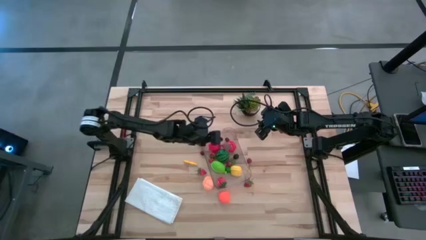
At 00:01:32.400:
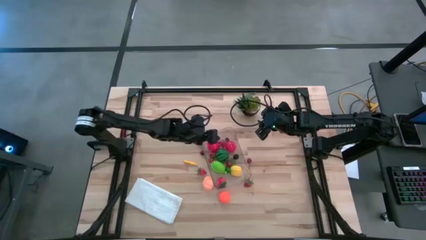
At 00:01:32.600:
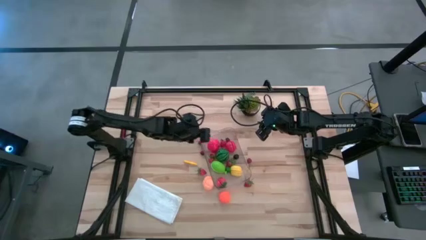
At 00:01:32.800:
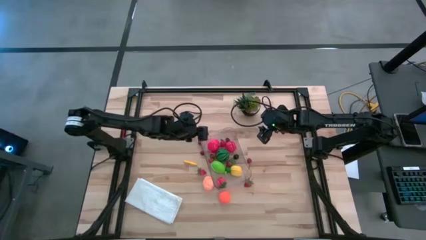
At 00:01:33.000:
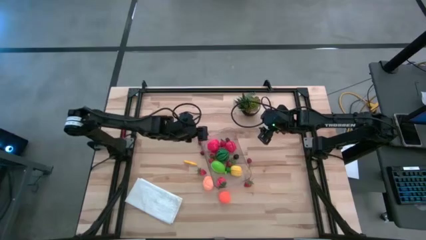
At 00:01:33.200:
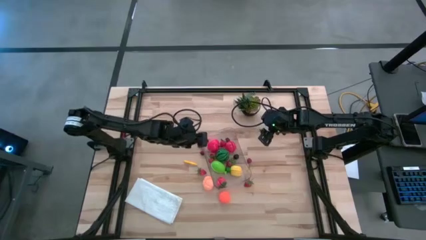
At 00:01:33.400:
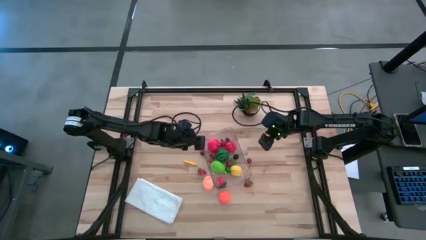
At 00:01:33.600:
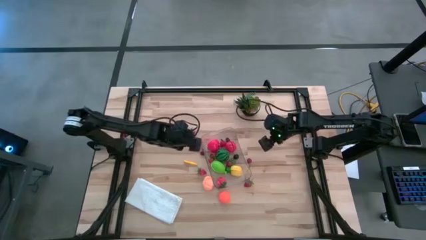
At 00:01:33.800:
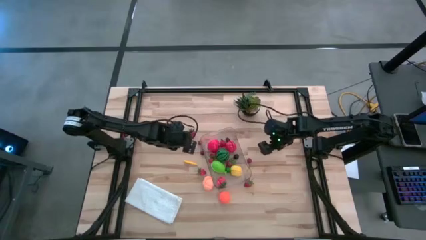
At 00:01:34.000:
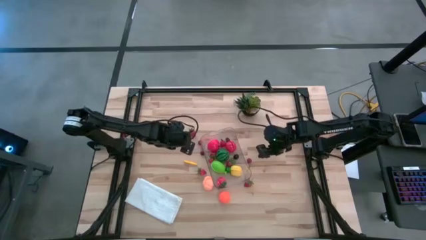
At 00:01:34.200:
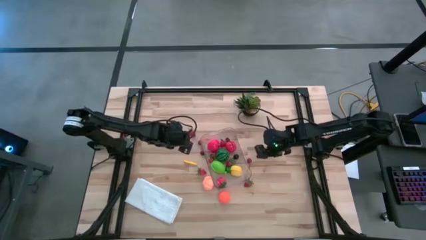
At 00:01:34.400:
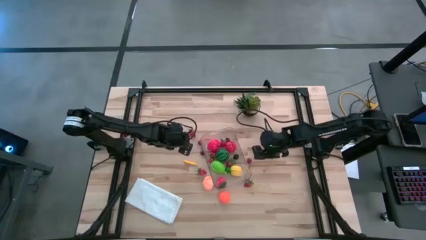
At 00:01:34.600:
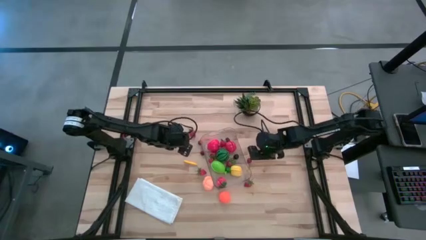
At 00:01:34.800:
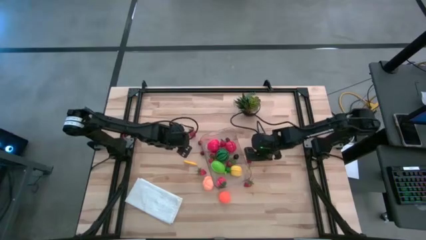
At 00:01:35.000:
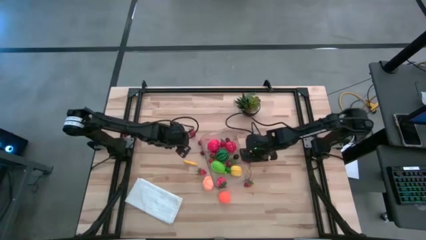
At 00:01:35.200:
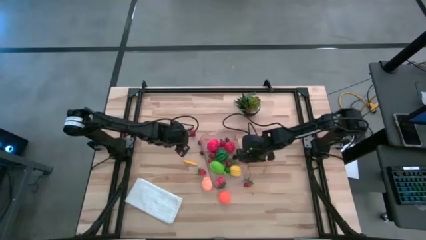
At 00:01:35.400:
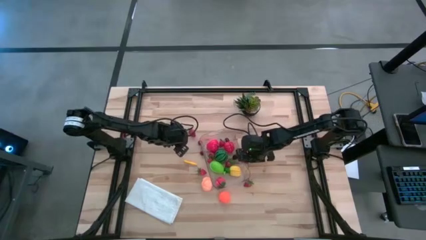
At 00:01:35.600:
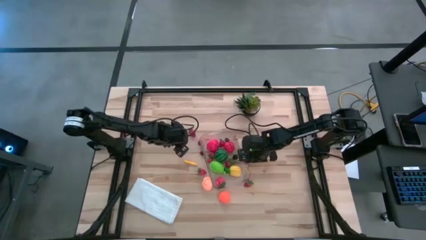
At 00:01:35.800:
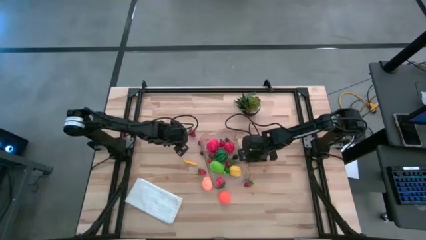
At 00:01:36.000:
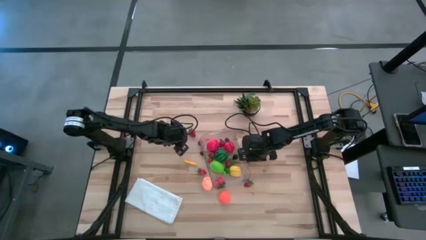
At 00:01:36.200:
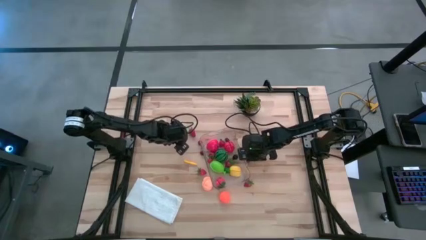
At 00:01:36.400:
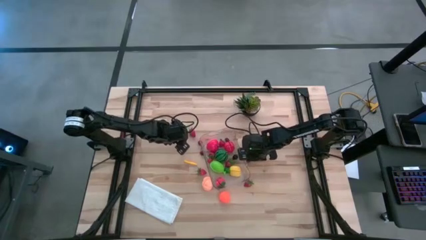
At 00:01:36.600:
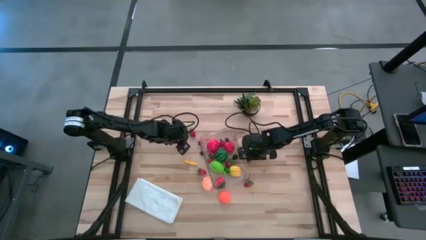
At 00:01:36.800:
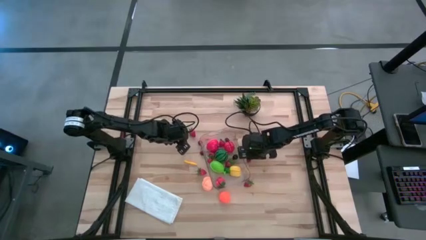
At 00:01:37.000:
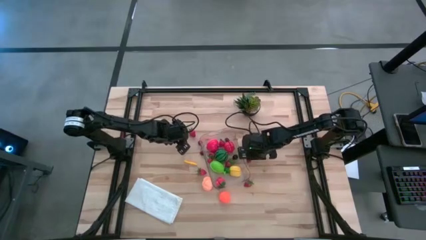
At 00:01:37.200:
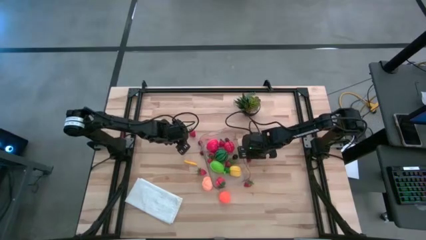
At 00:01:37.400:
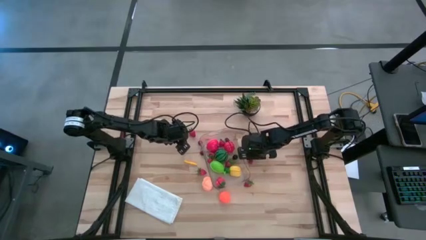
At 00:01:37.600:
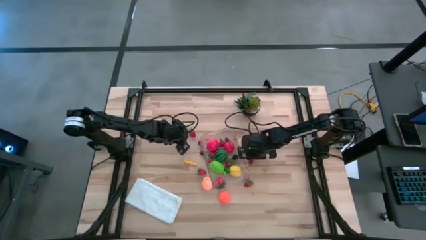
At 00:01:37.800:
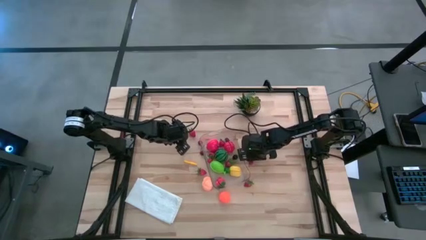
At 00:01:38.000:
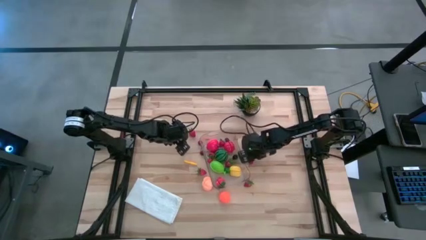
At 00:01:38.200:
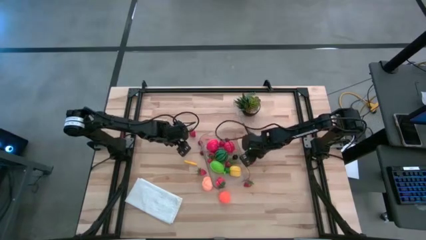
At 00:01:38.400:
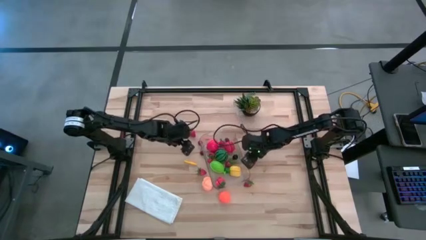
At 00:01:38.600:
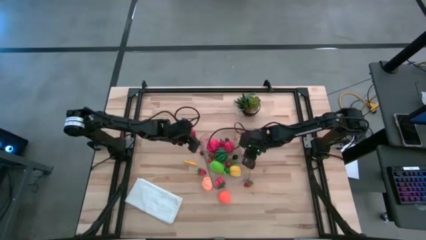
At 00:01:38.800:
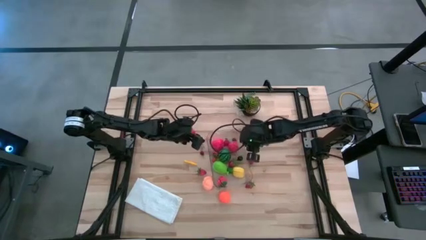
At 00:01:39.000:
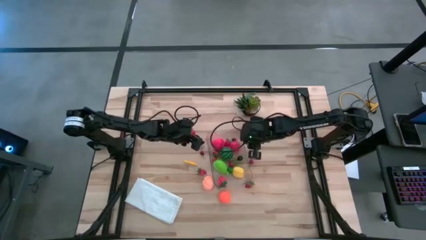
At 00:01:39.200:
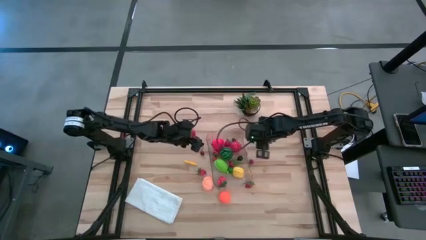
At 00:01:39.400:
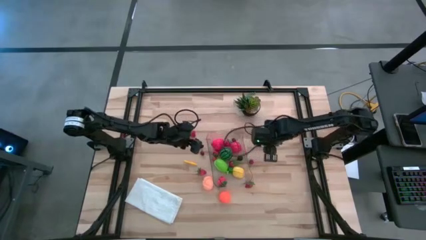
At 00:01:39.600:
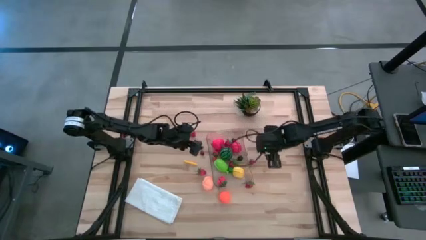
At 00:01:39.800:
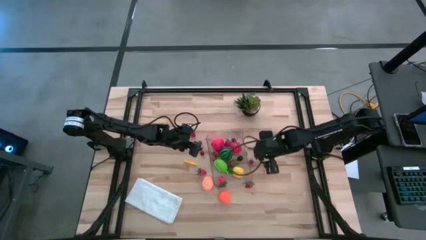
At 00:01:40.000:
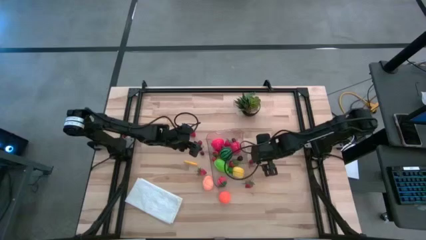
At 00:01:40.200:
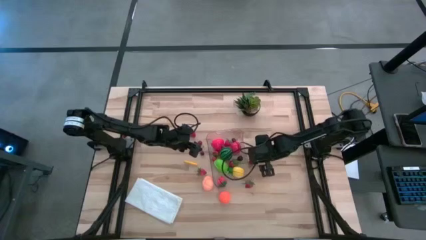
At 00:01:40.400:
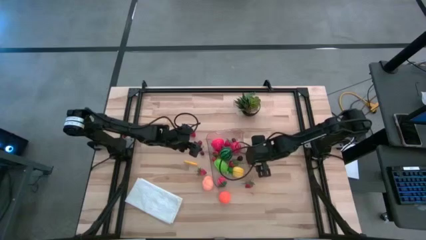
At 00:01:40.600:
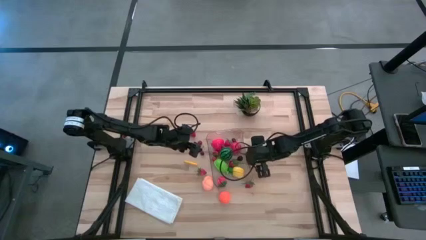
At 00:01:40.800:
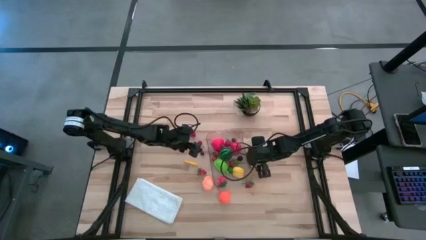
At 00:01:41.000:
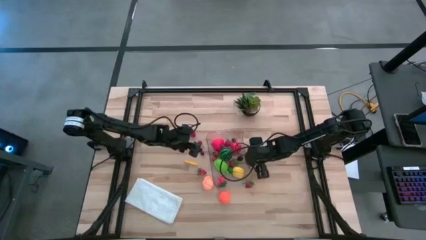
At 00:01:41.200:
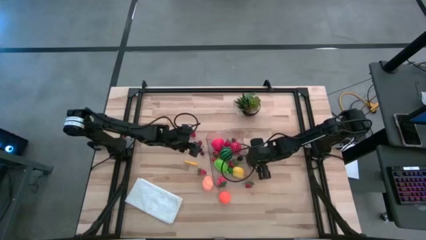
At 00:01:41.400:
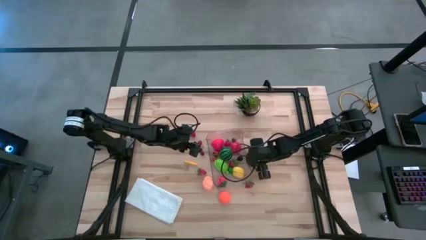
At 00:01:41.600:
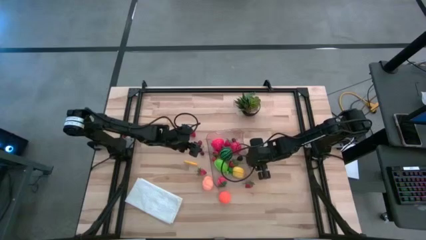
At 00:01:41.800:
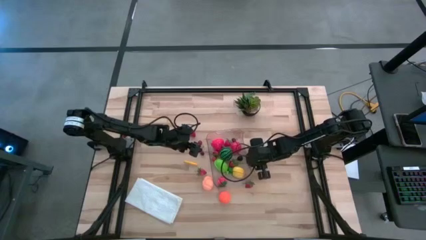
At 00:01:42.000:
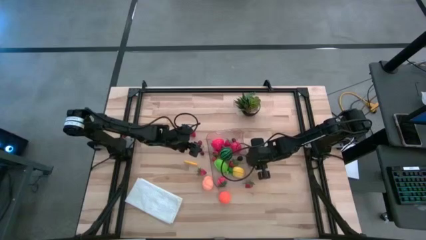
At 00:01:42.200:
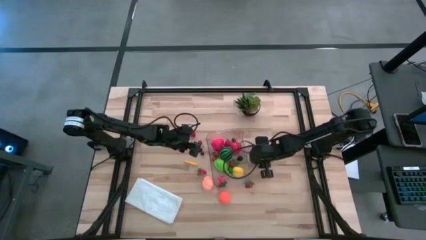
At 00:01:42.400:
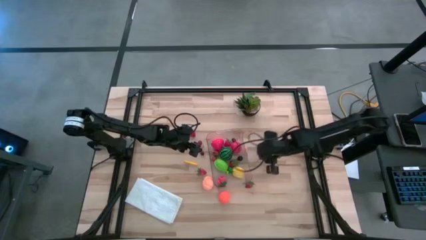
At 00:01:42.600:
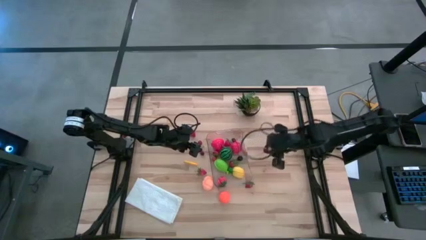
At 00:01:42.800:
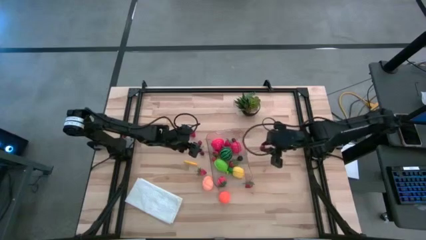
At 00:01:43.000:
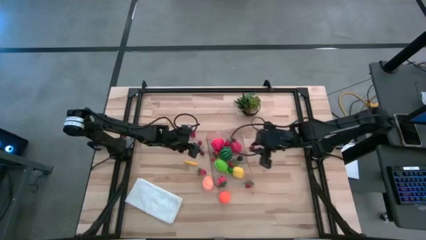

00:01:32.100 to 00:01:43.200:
Task: Pick and placing Produce into tupperware
Put the red cherry into the transparent bin

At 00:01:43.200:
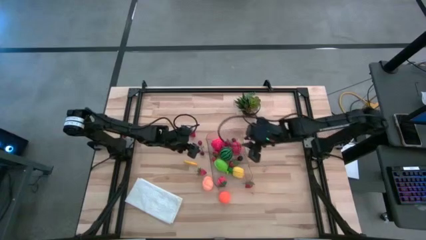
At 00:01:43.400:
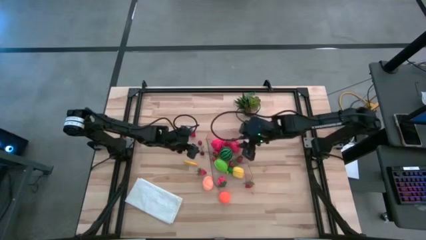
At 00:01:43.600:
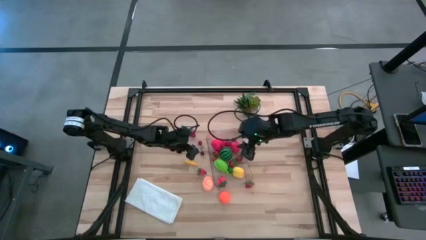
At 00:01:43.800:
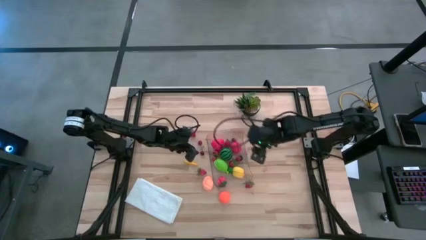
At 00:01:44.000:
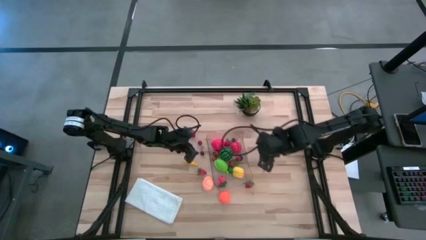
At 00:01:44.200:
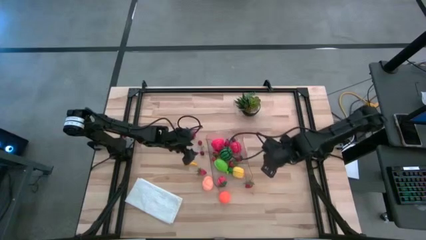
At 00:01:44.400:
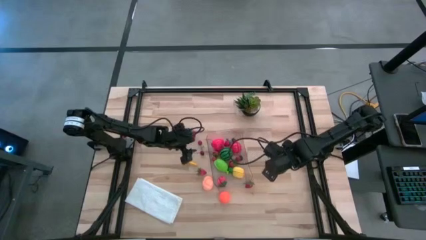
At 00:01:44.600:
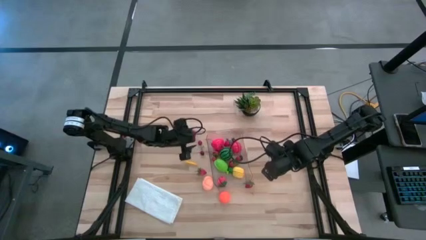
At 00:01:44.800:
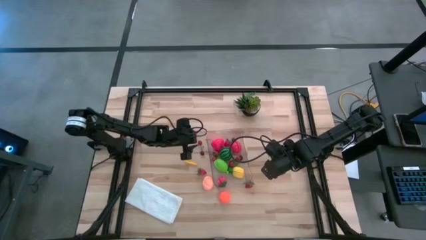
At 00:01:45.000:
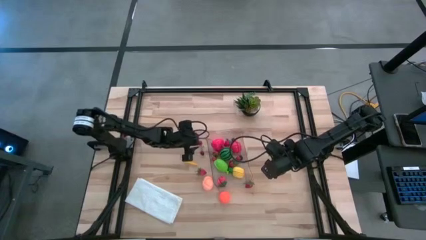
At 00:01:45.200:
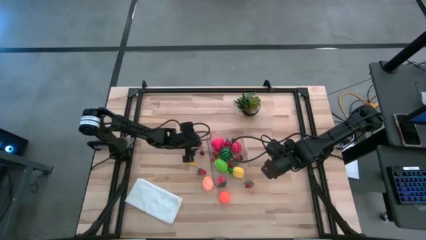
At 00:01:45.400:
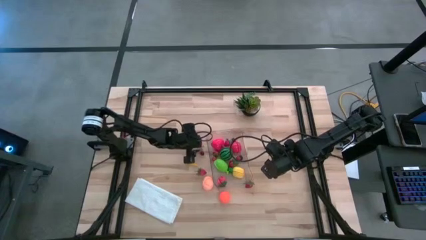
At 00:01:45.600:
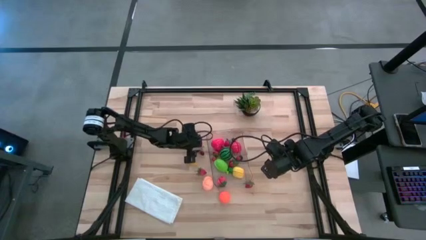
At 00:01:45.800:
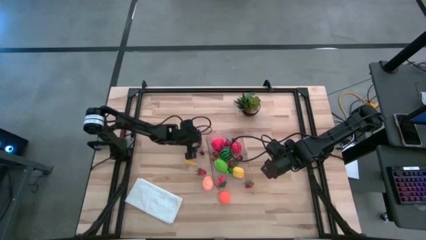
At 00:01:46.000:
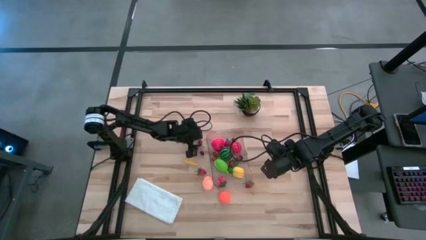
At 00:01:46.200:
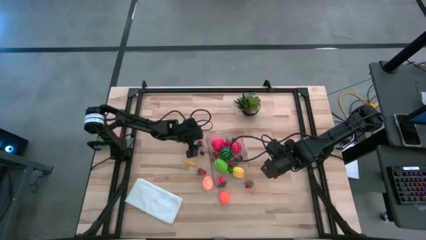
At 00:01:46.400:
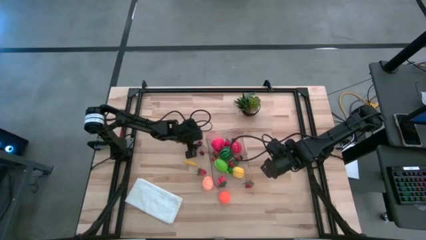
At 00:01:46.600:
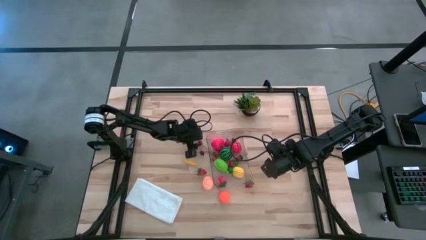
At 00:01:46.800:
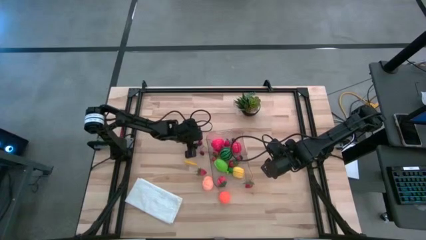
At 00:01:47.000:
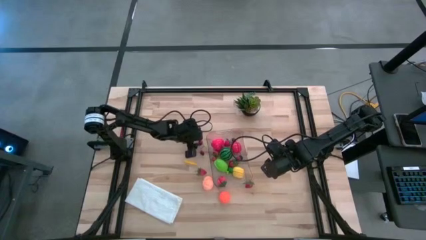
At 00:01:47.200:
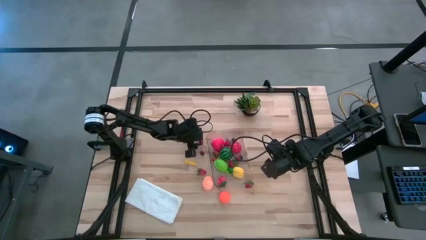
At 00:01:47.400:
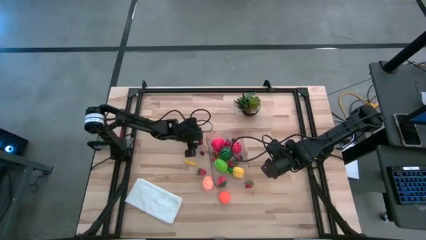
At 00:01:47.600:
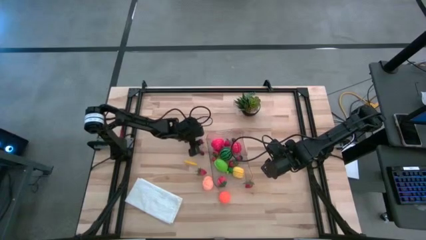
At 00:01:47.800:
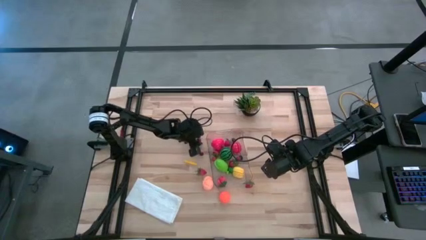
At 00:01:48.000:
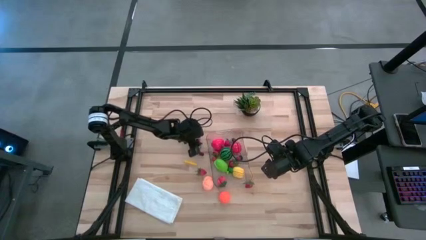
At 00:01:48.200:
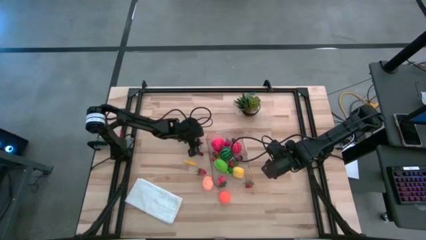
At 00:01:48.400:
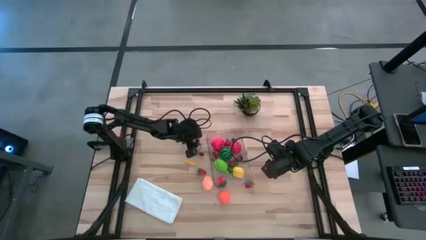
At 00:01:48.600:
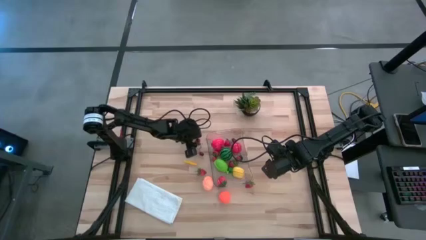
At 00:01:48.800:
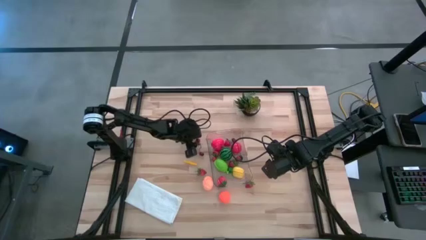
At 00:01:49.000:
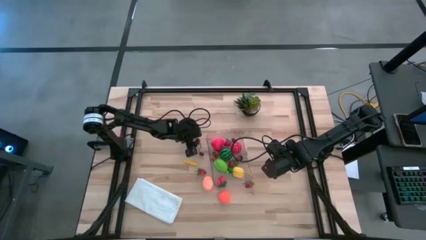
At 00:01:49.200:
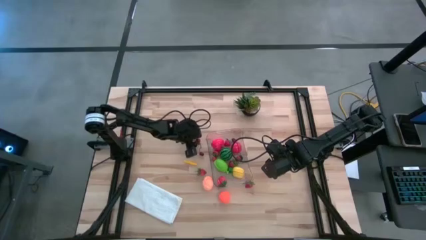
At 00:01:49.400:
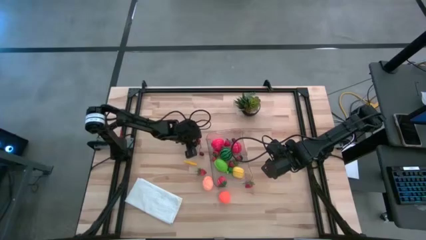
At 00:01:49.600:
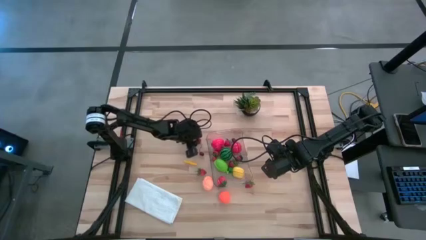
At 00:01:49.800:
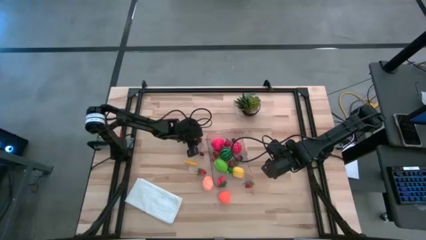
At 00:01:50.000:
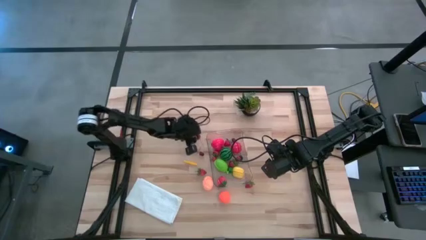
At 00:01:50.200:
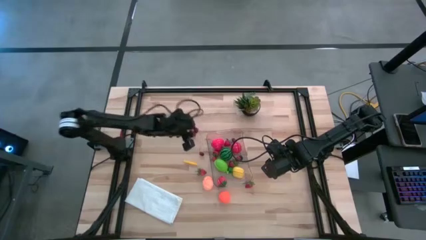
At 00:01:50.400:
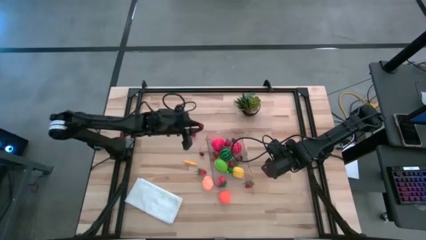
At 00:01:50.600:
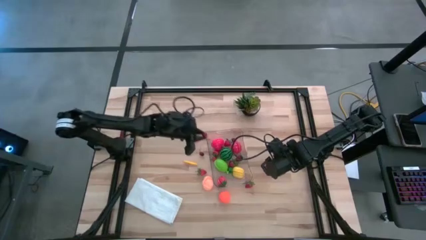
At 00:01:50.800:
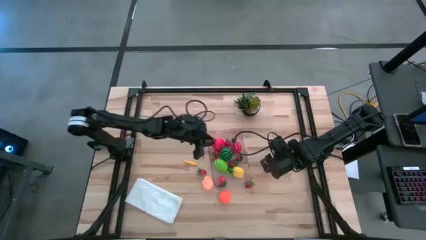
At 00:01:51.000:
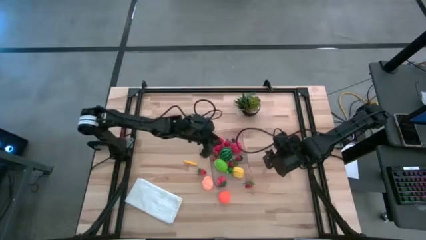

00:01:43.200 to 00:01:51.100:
Put the red cherry into the transparent bin
